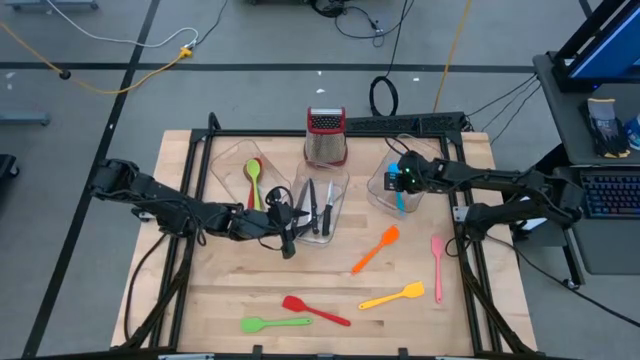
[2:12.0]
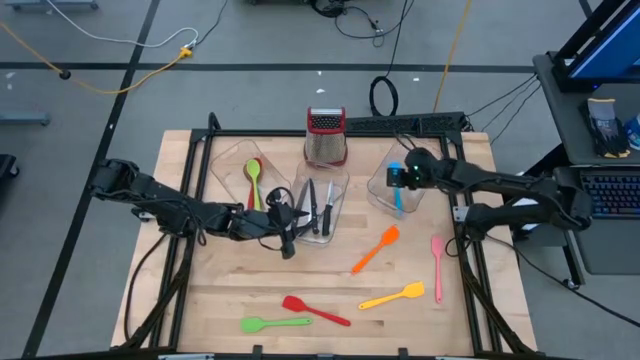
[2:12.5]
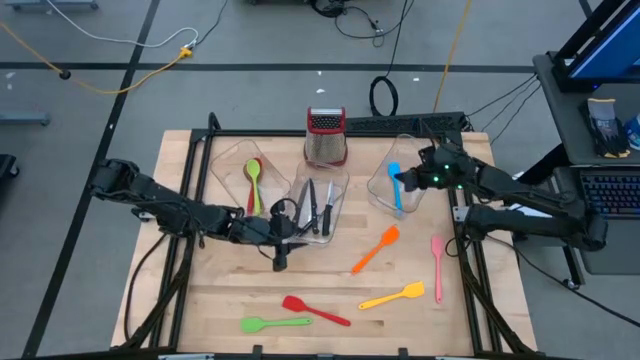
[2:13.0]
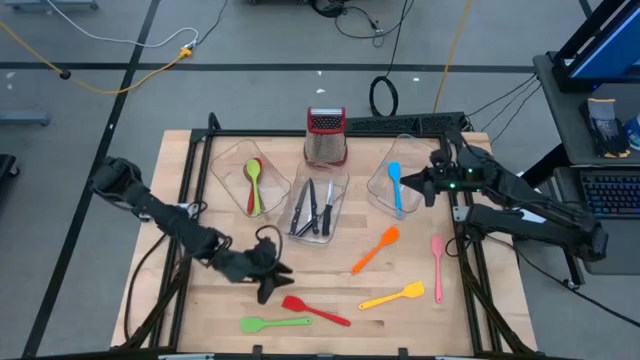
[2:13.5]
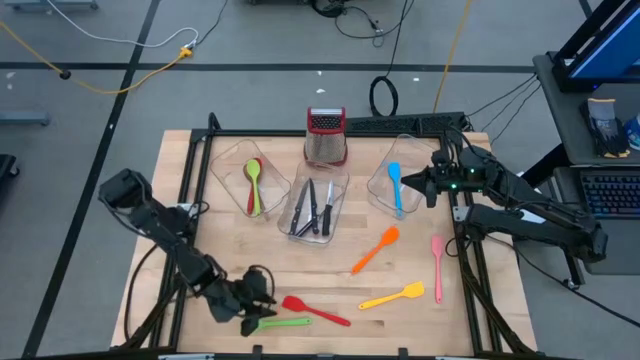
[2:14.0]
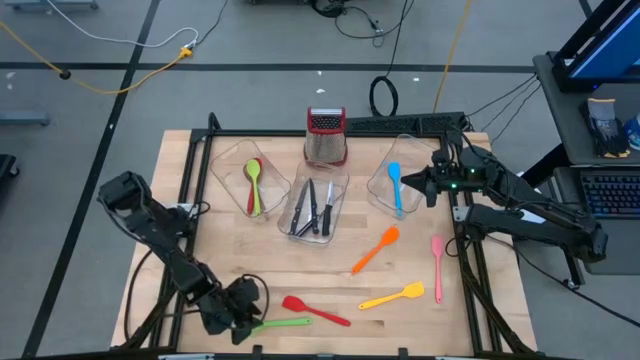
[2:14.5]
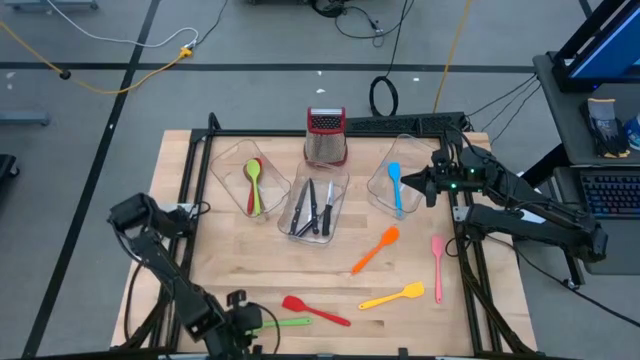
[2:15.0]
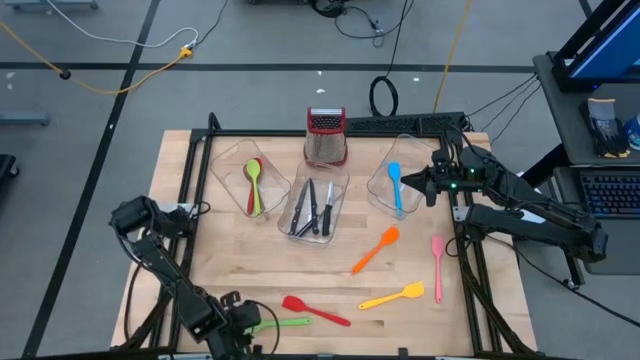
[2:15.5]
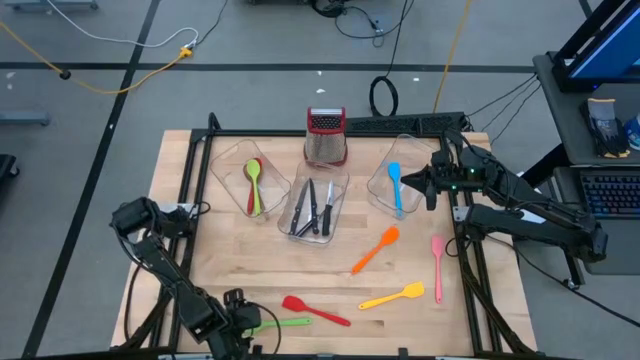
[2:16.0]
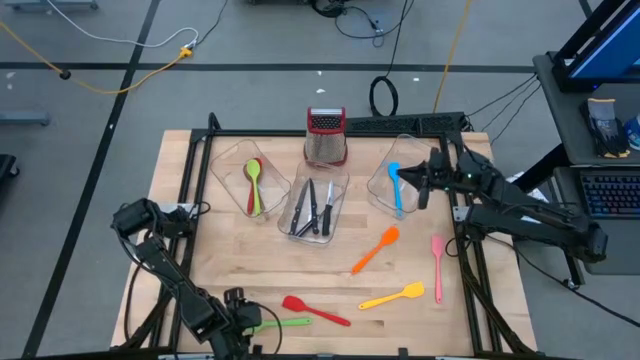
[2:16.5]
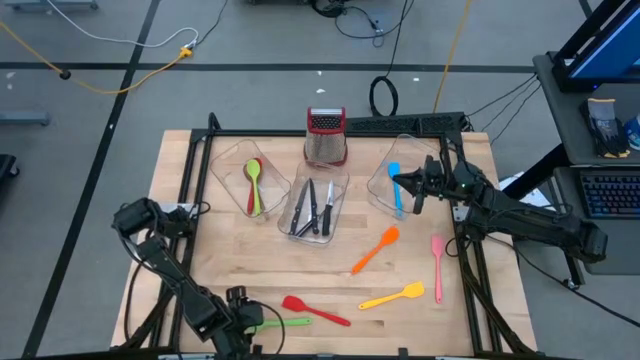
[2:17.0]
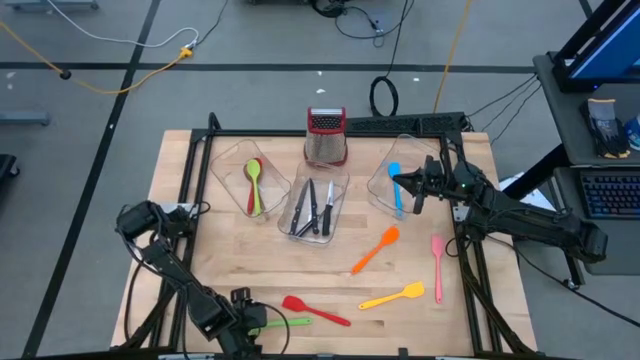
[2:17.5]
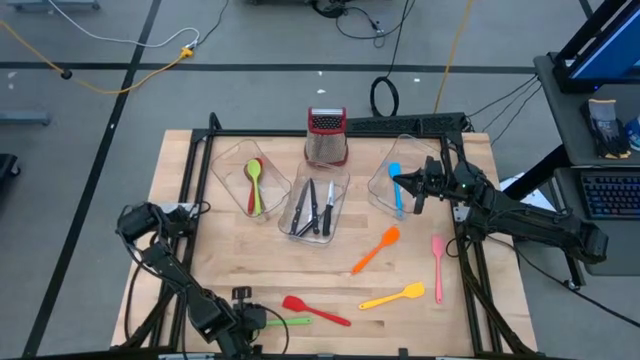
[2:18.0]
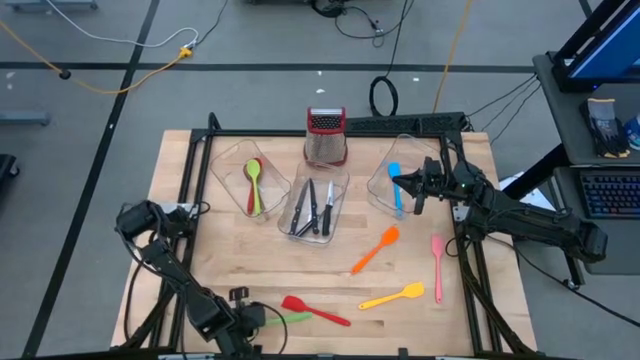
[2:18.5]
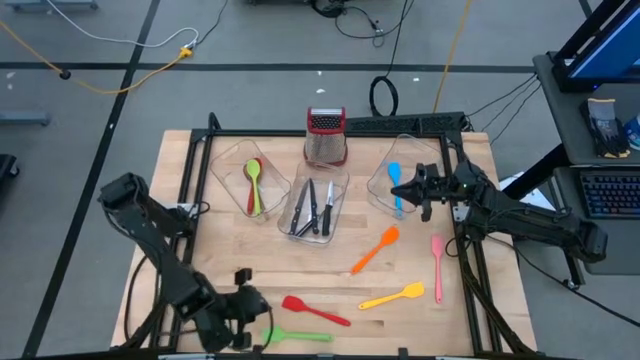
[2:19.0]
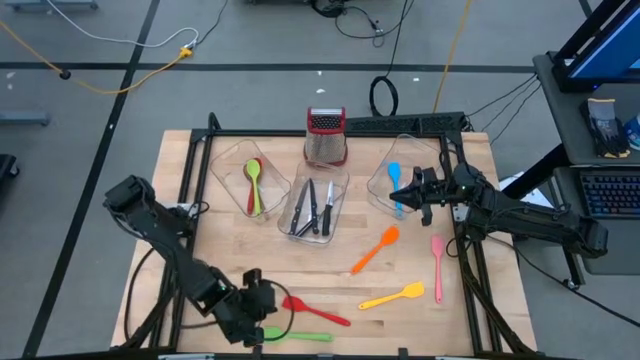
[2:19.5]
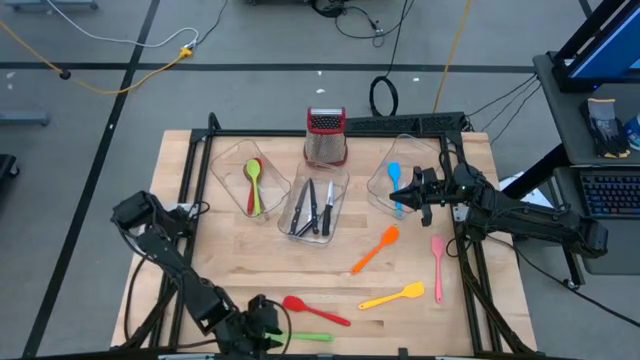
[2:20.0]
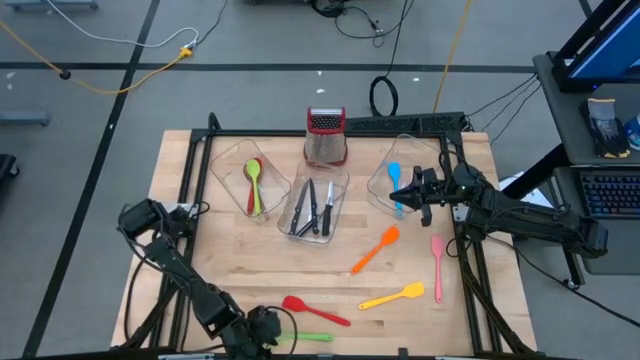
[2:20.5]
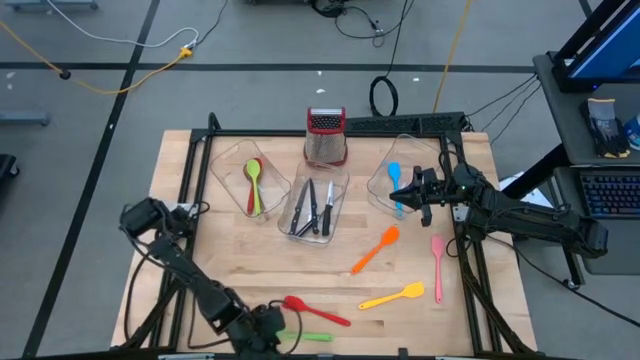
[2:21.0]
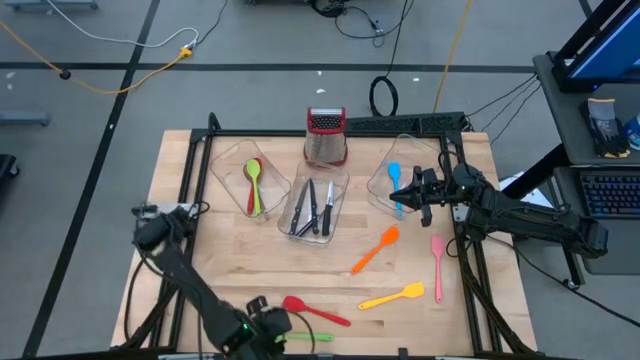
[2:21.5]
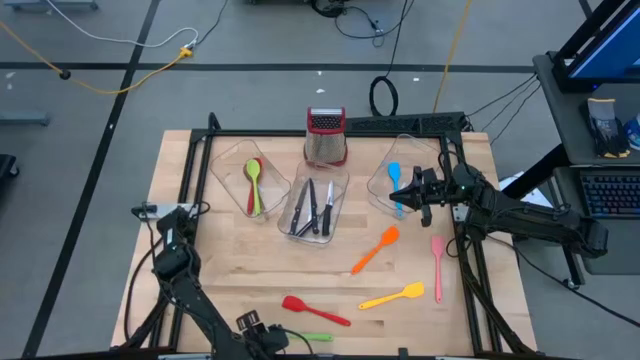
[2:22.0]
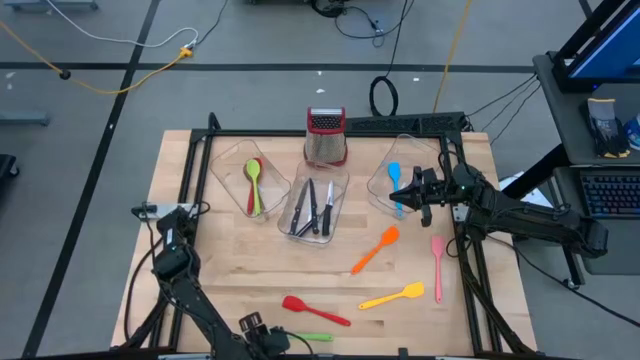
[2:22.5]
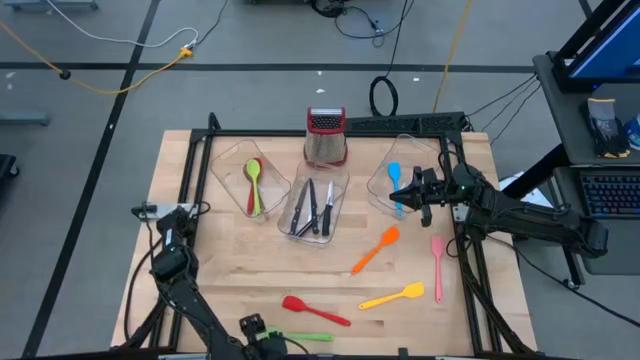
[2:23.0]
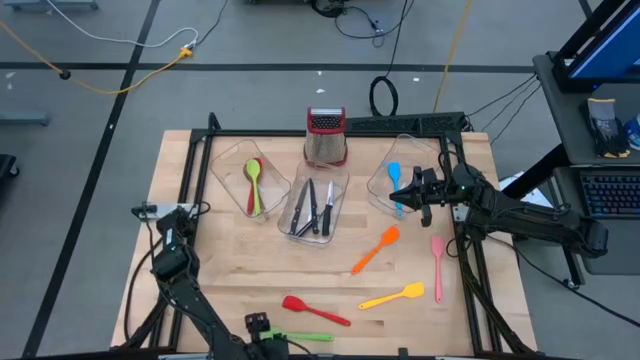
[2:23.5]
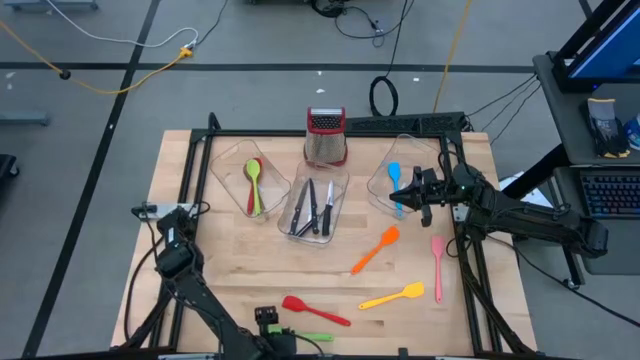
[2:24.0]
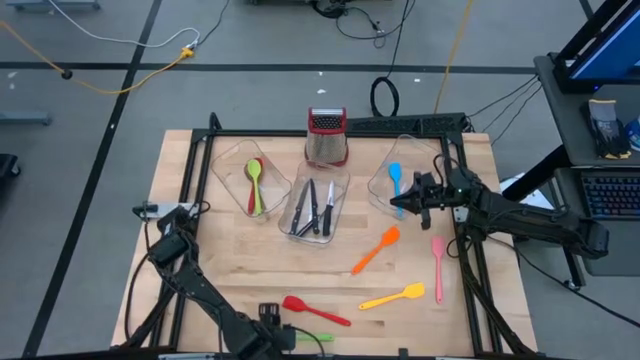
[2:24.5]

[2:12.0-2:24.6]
Task: Pick & Place Kitchen Items
Put the green spatula on the right transparent bin

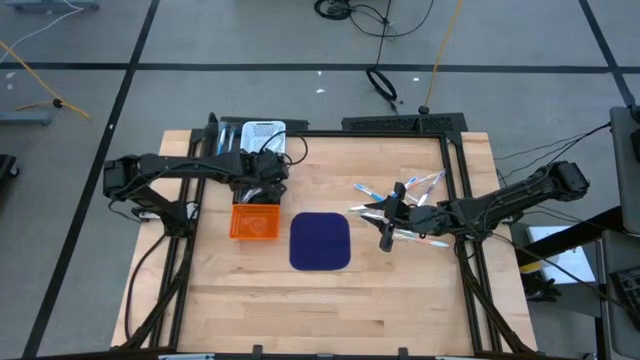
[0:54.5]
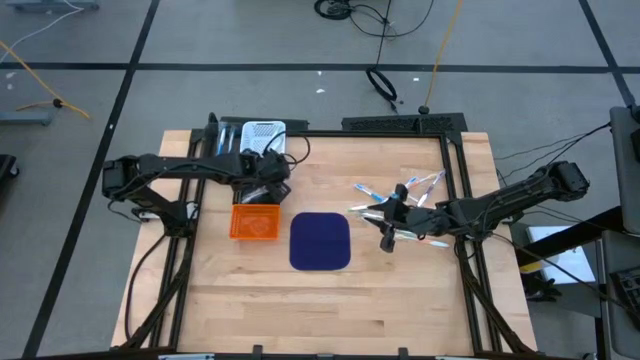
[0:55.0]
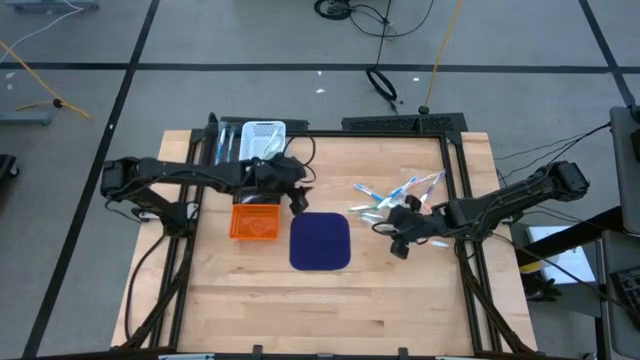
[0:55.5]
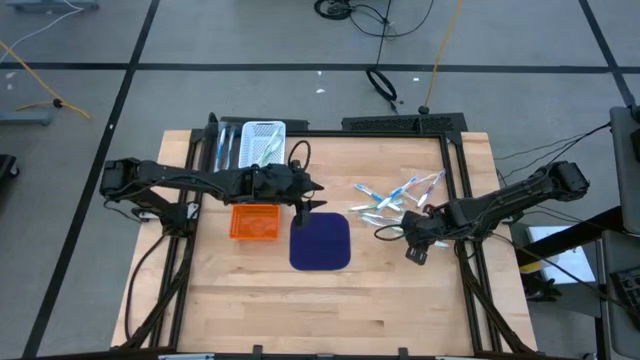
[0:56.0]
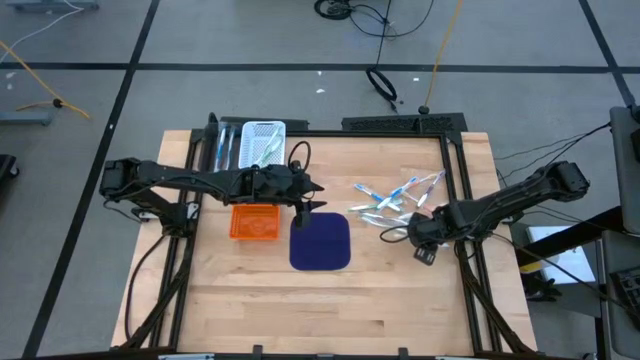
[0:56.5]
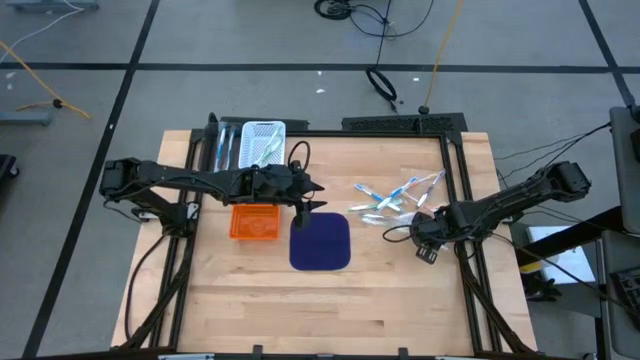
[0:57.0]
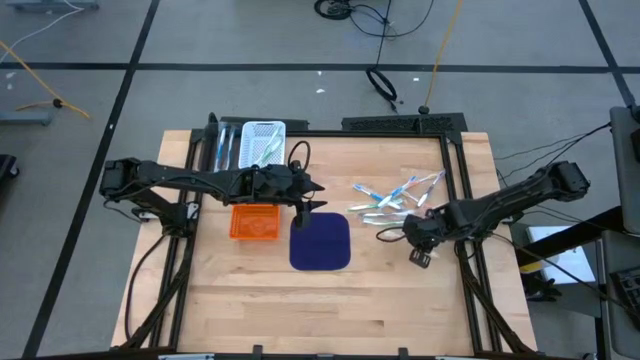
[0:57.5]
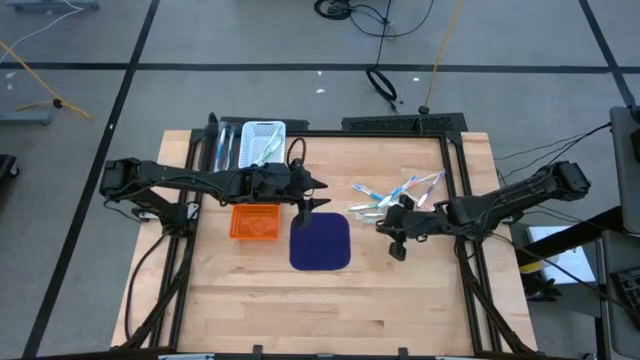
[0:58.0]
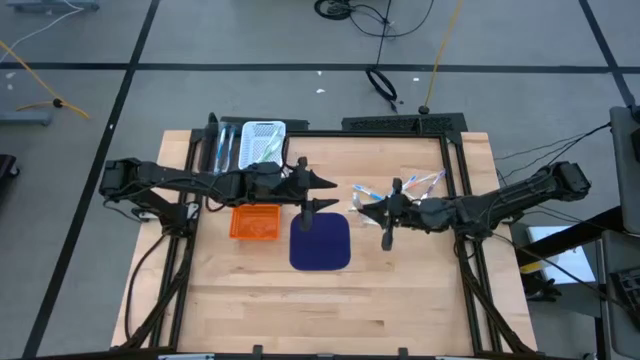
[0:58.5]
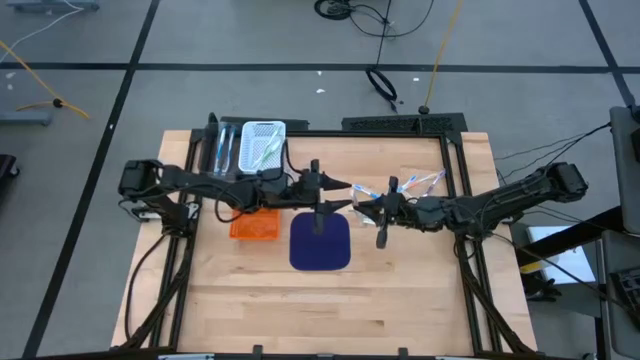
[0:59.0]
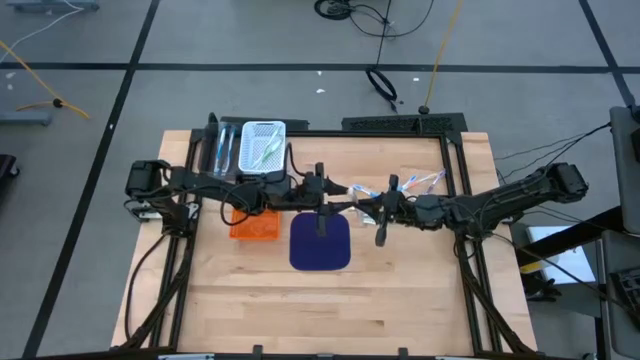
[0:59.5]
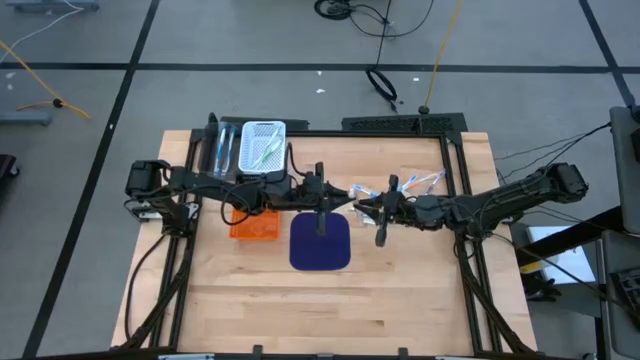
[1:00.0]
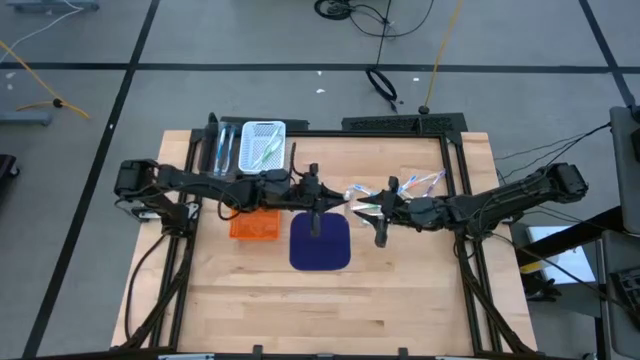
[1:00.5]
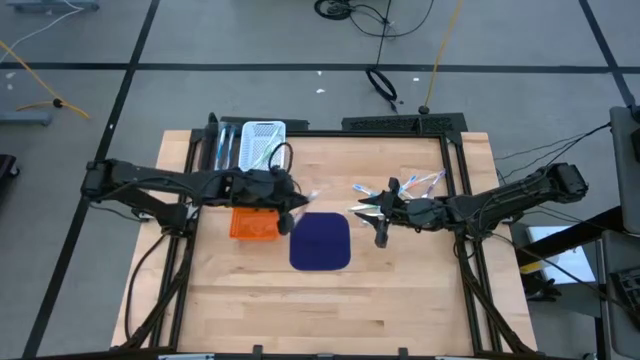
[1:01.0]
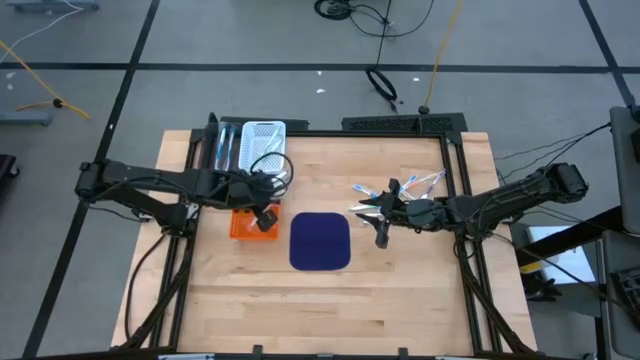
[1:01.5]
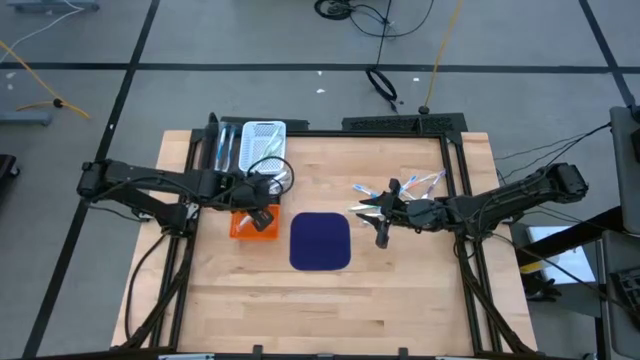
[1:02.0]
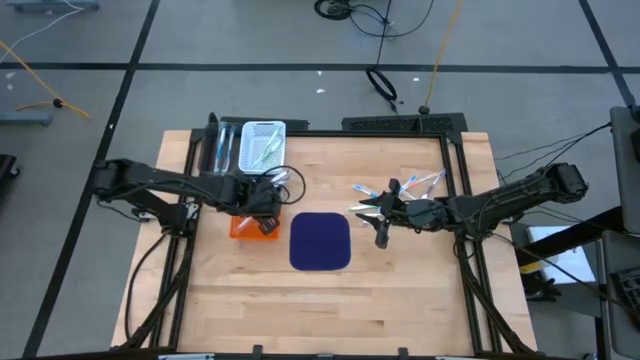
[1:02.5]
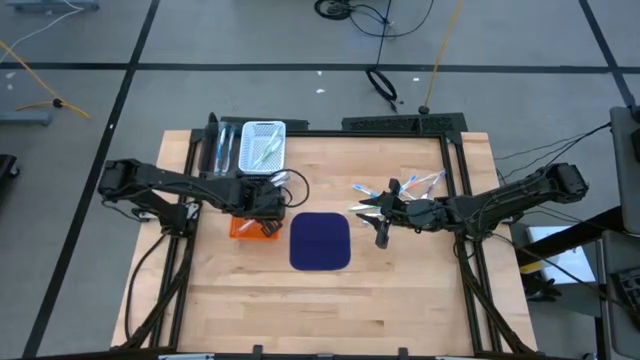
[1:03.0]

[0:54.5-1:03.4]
Task: Pick & Place Toothbrushes
Put the orange toothbrush into the orange bin
